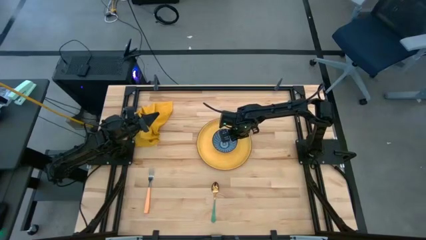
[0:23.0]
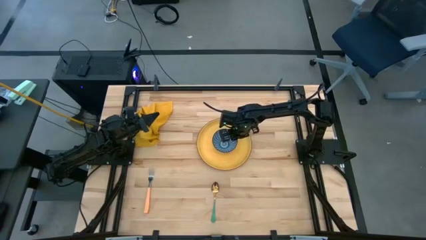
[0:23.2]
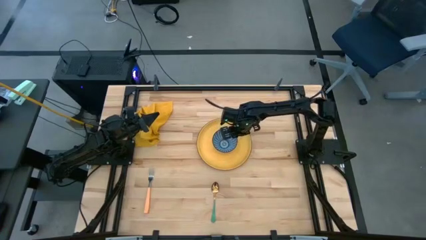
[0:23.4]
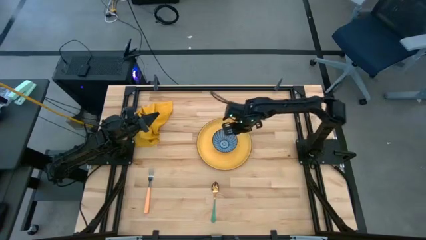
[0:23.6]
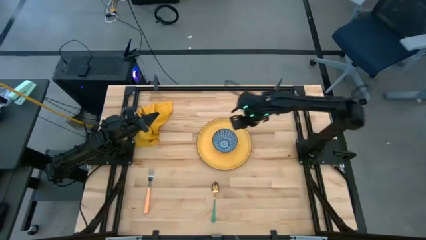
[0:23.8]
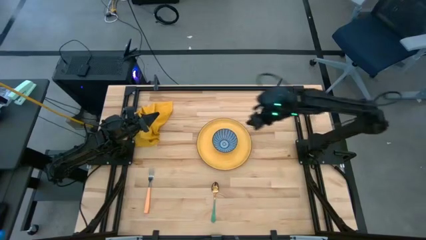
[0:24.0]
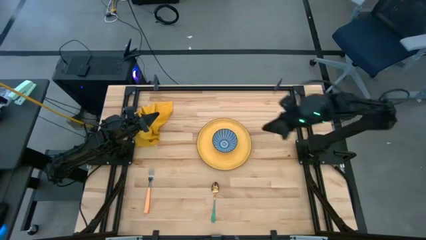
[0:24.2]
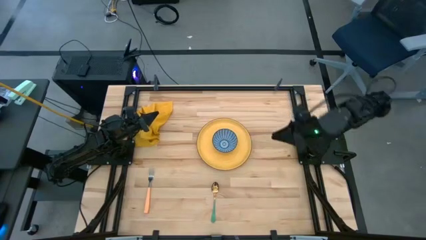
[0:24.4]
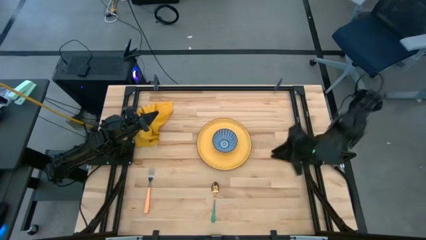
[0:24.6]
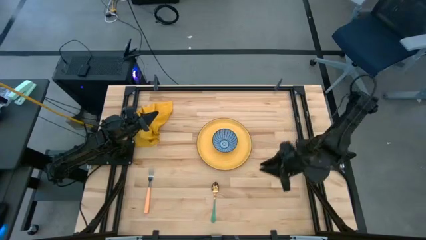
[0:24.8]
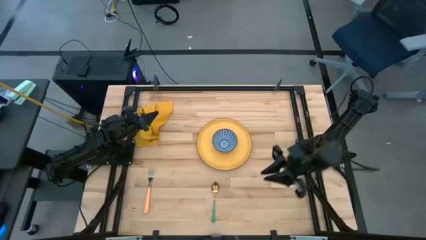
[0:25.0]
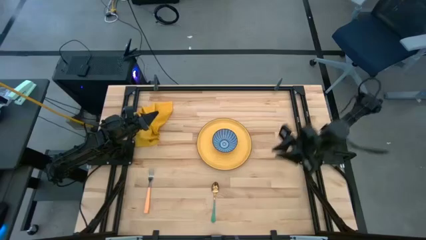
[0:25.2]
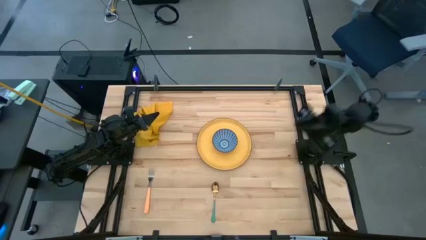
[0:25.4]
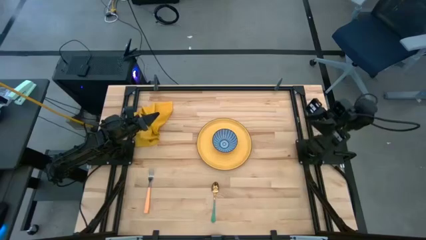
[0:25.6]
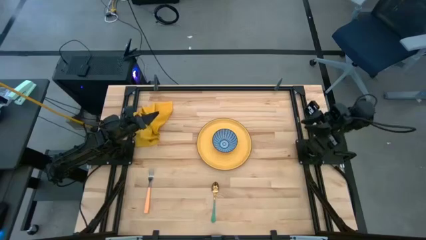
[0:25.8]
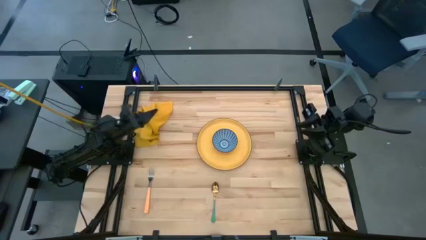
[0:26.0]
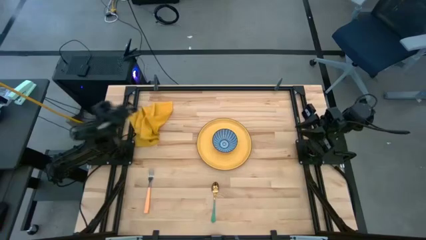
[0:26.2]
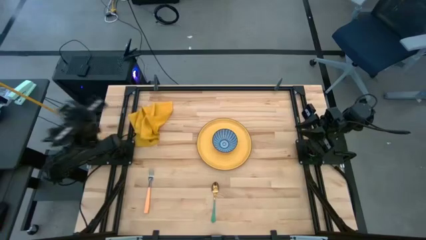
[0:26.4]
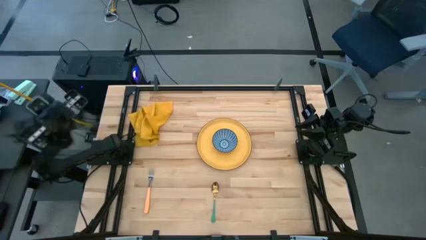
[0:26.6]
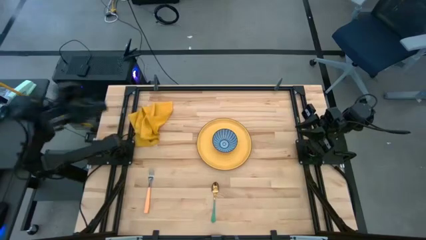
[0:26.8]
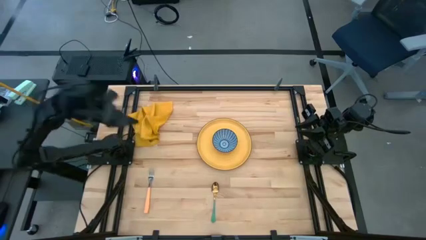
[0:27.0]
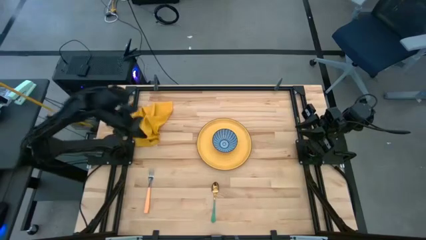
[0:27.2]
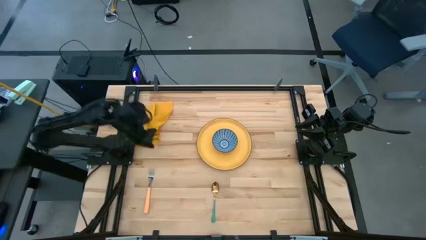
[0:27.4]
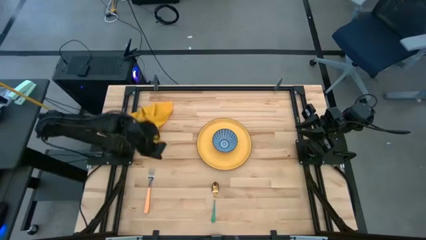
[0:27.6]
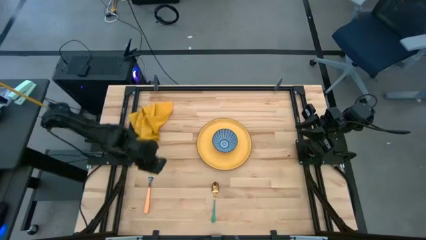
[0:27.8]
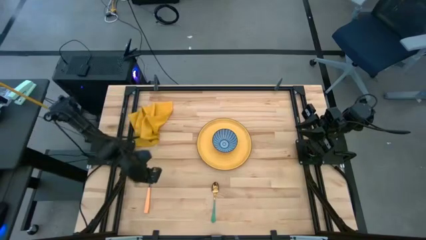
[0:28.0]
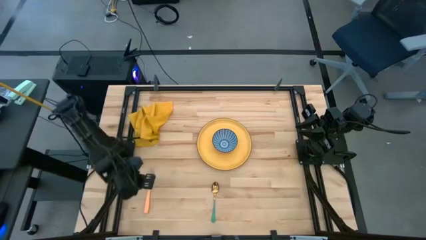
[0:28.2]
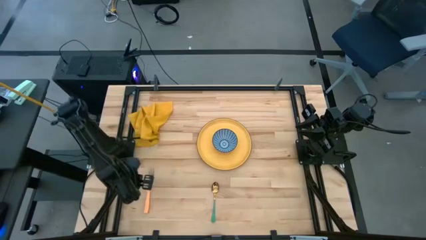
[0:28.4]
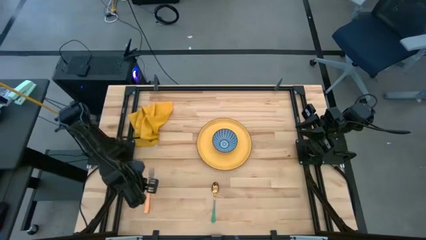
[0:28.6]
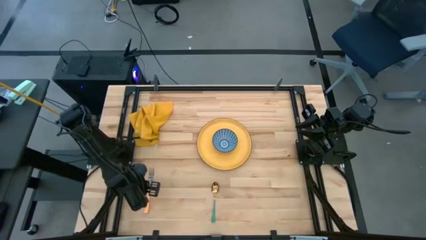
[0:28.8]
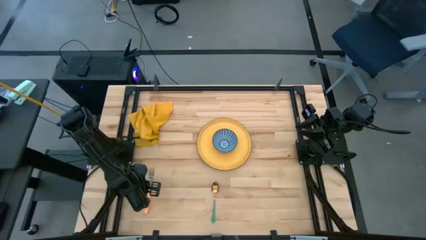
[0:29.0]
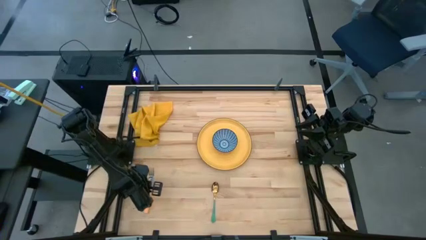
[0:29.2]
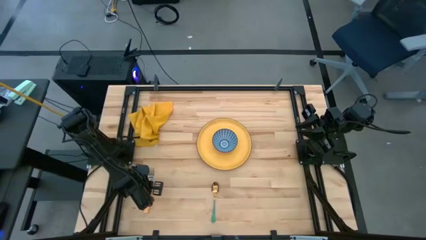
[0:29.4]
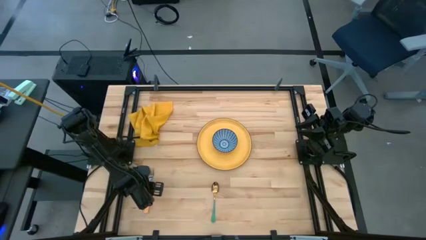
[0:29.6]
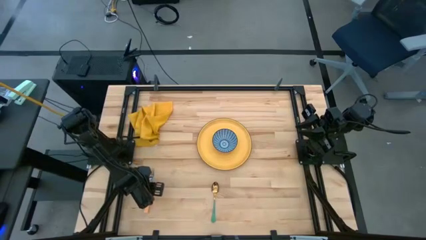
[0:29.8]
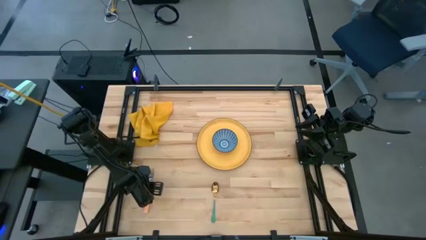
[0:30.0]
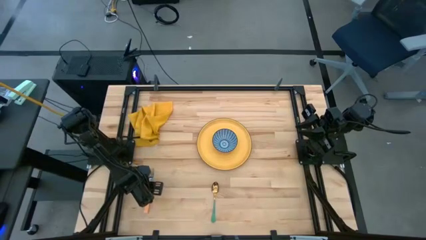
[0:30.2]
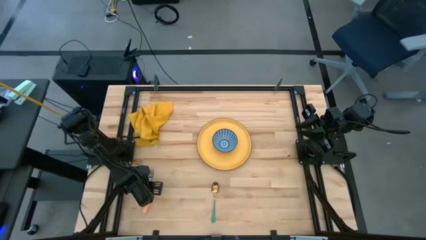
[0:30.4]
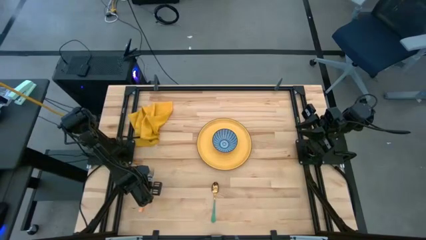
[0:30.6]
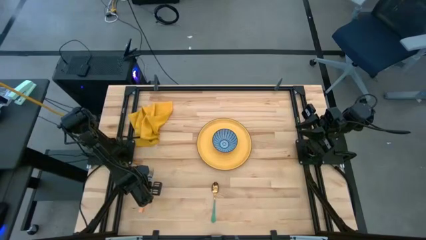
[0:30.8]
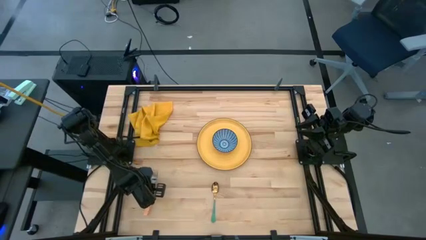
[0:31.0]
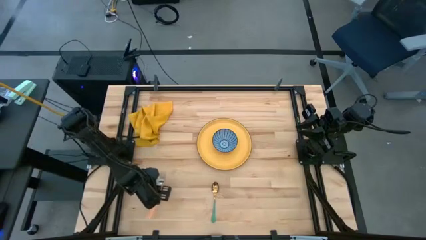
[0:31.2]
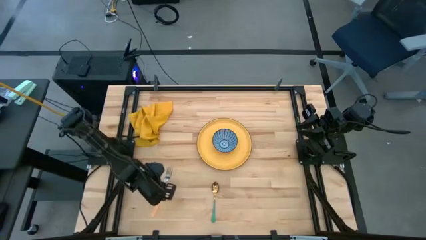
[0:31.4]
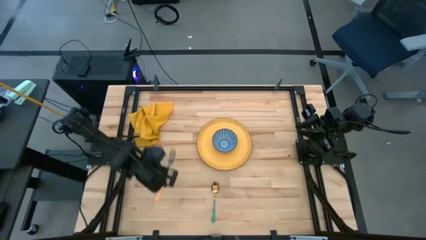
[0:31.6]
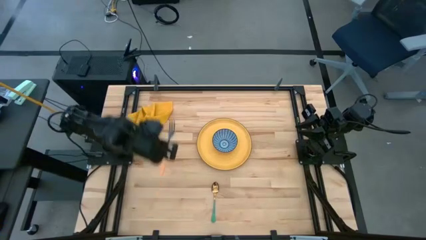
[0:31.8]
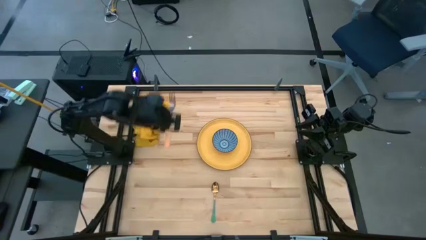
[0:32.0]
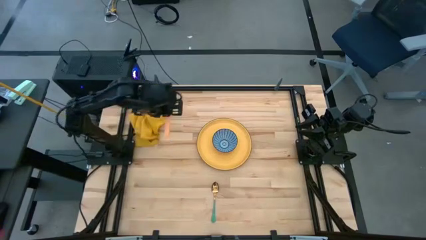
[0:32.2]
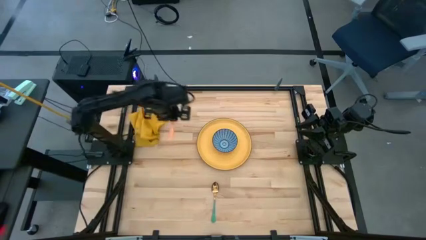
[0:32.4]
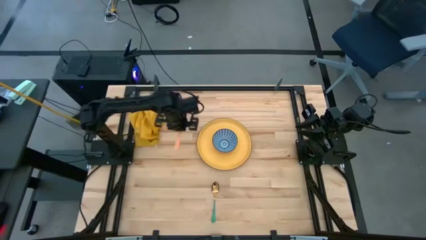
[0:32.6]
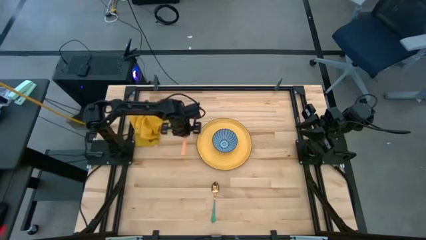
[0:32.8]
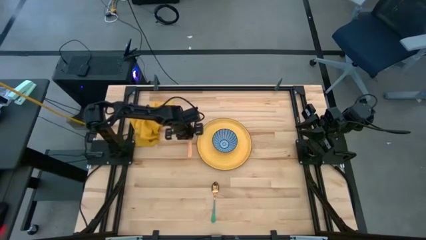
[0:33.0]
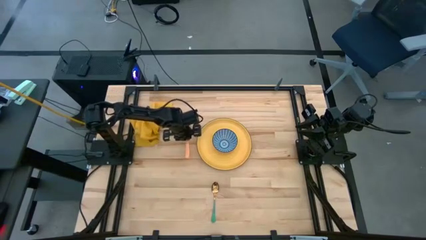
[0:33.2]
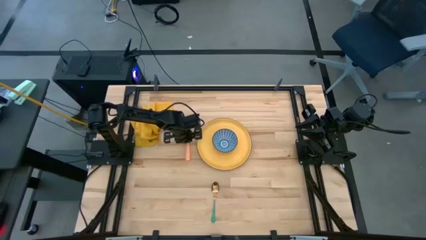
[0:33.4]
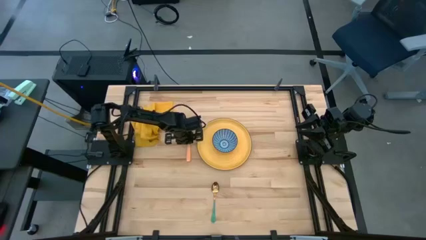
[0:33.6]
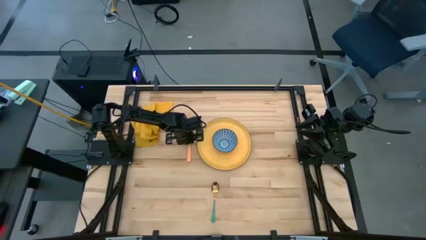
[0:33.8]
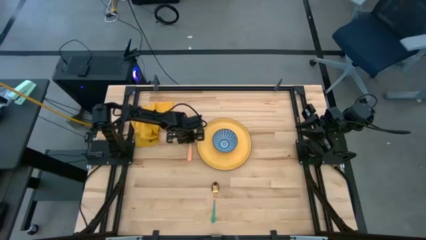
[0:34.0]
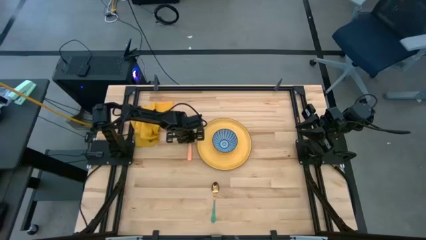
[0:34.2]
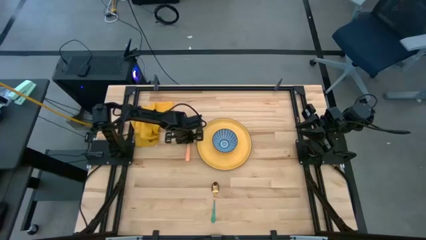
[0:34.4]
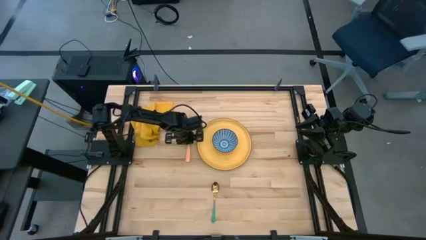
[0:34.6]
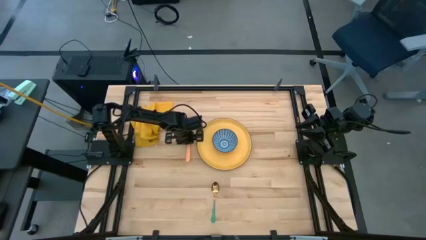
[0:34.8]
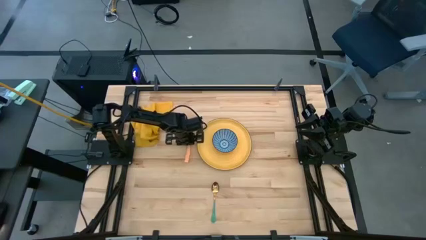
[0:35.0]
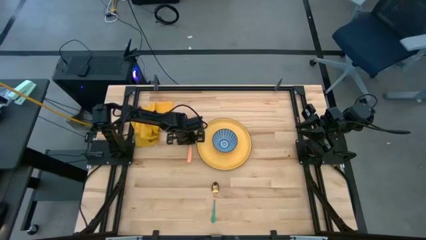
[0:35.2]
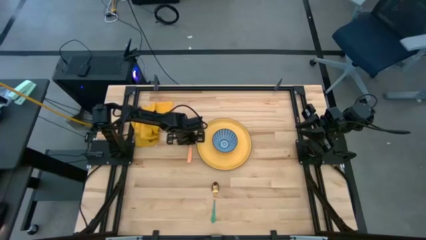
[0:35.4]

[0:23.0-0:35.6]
Task: Set table place
Put the orange fork to the left side of the gold plate
